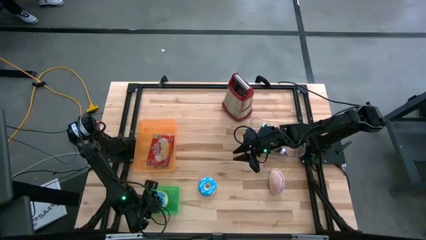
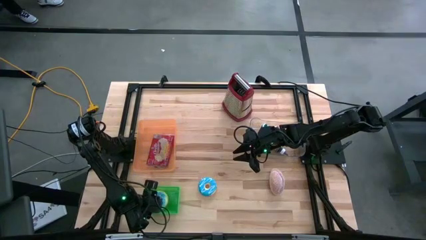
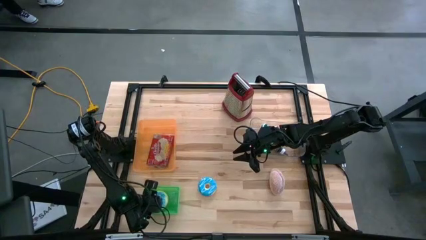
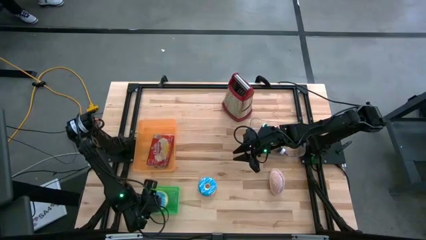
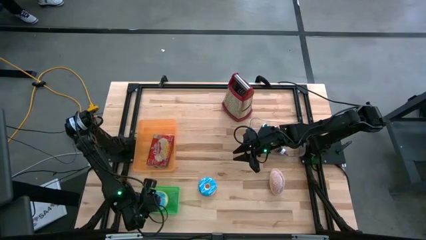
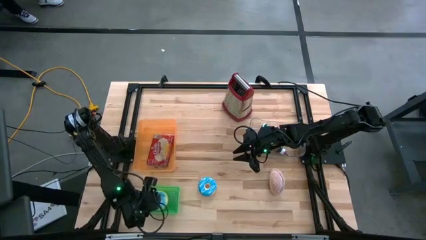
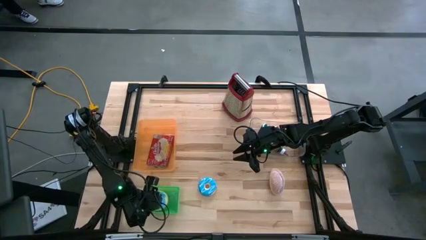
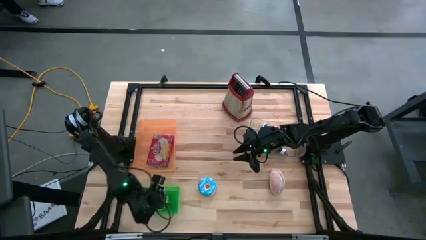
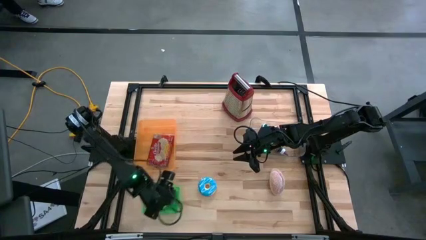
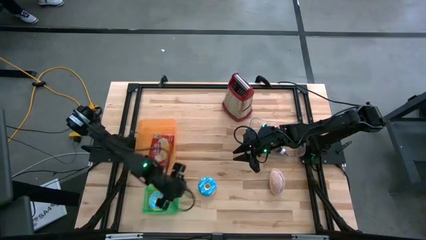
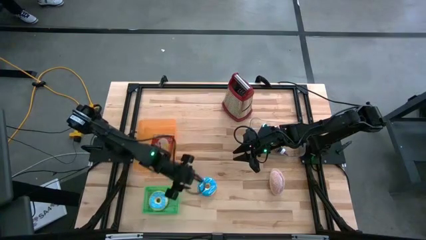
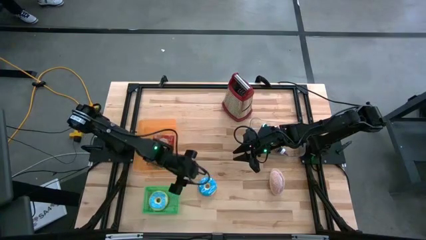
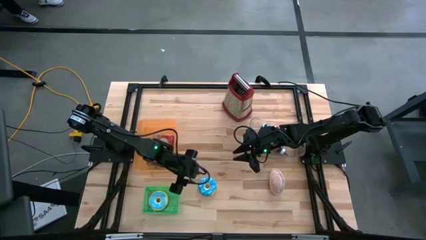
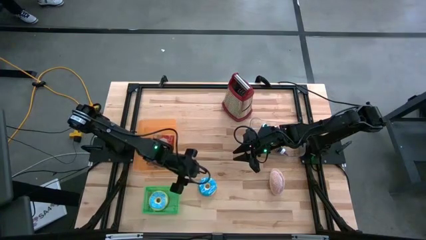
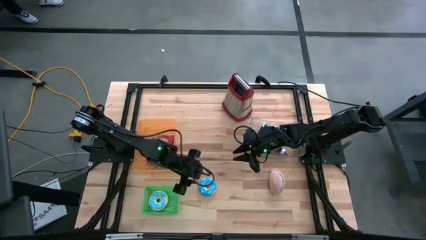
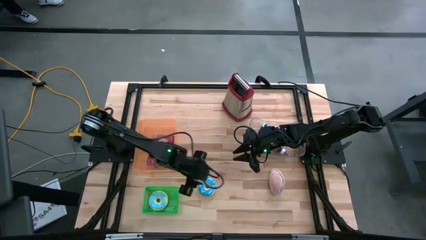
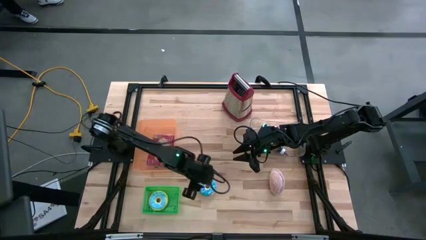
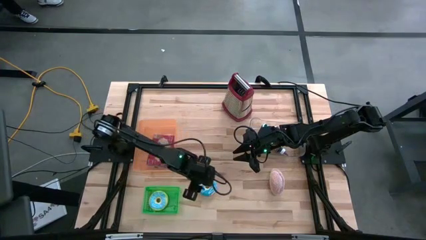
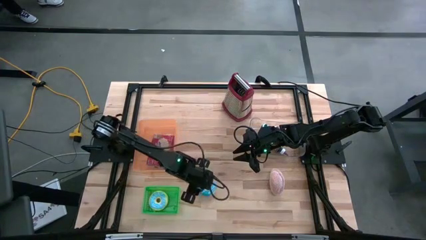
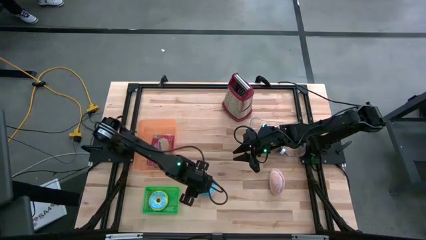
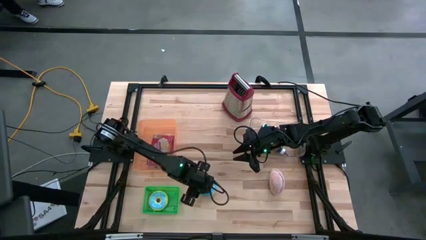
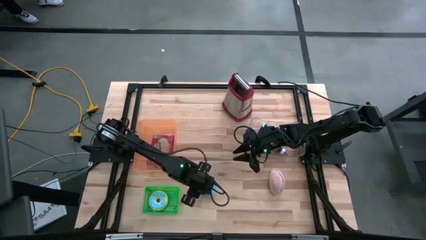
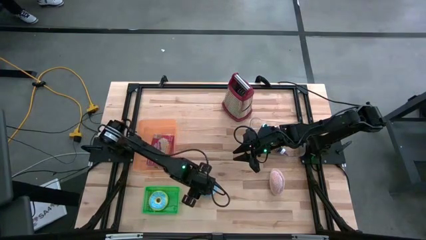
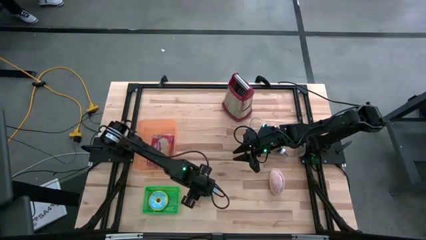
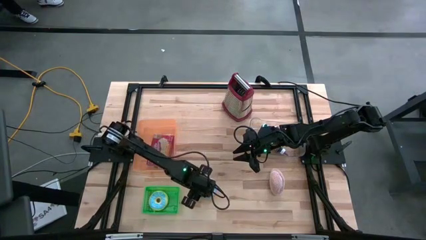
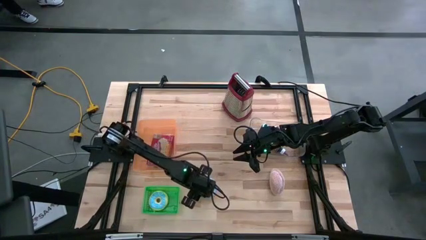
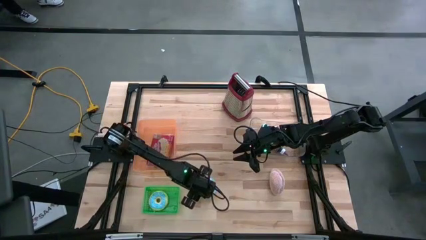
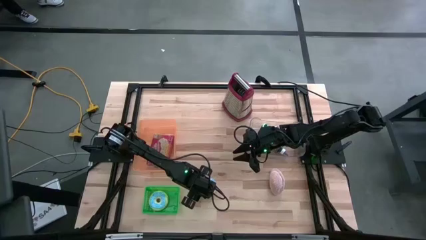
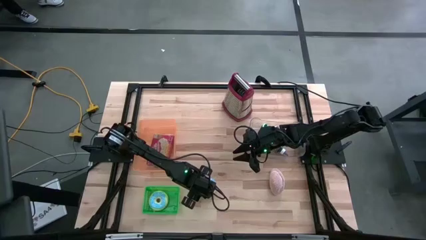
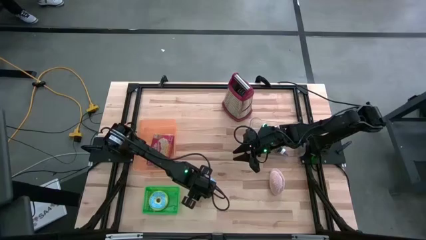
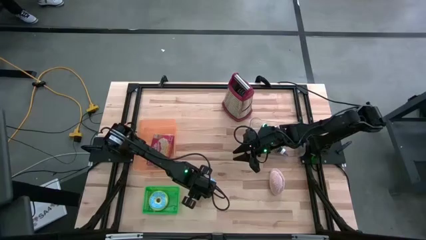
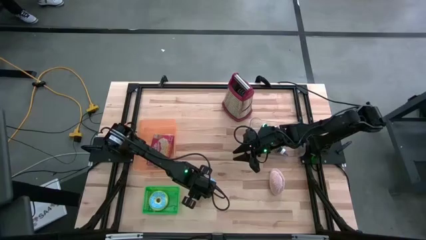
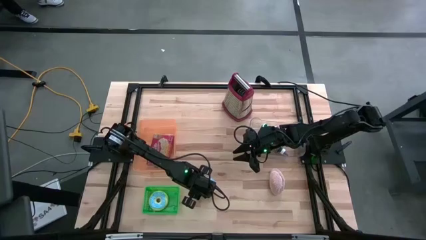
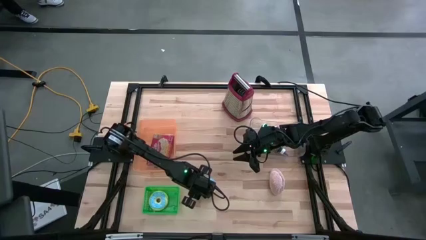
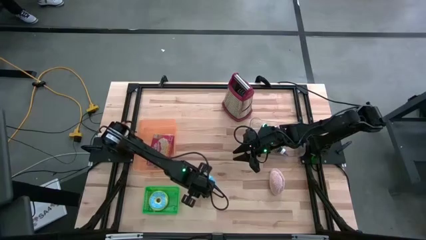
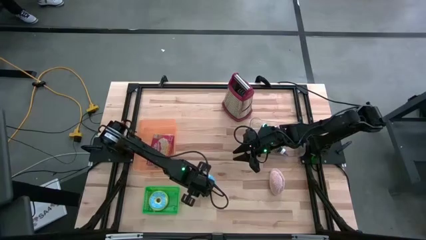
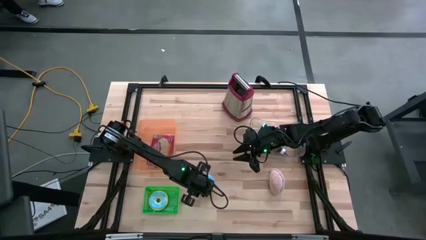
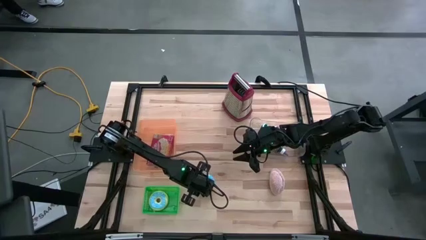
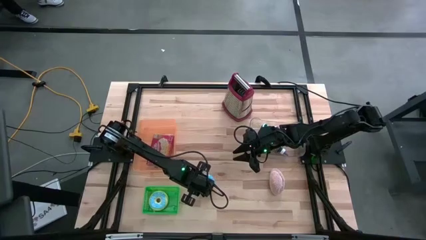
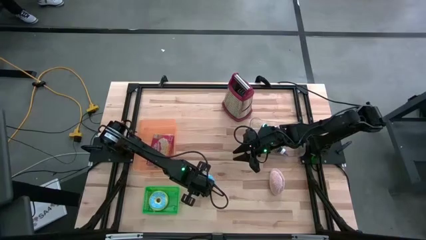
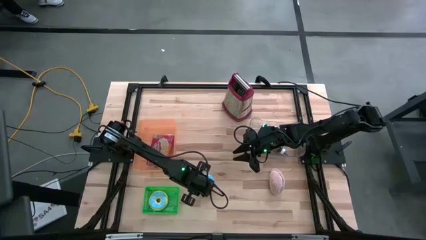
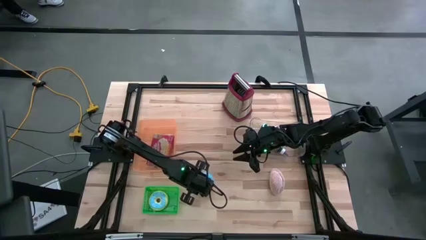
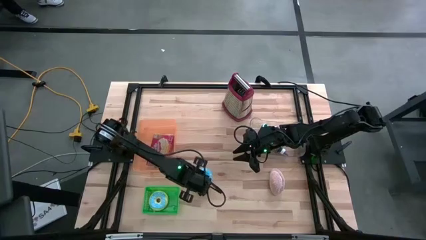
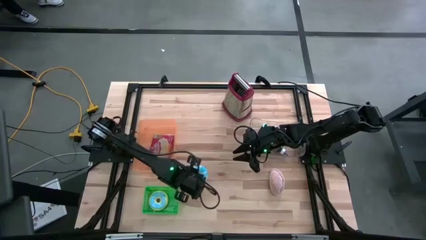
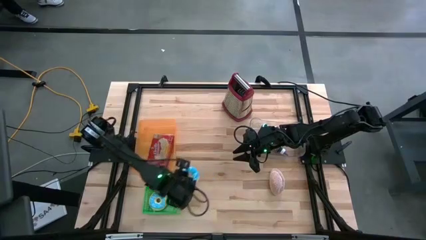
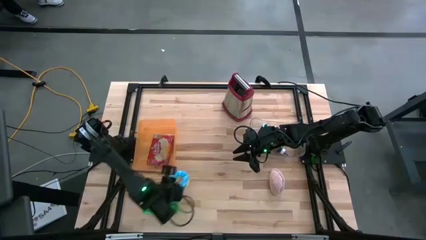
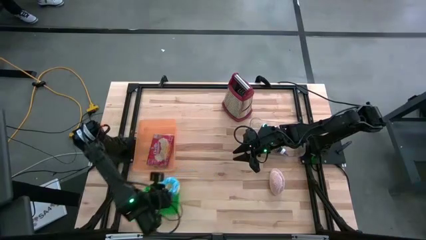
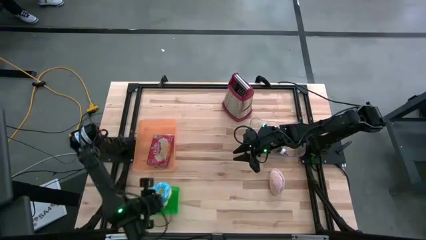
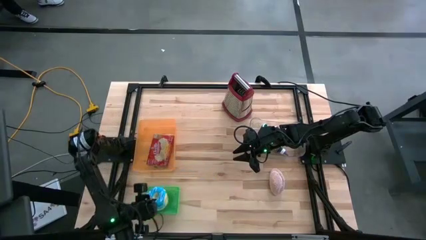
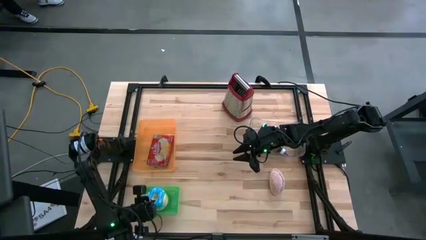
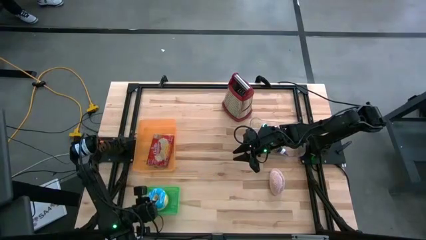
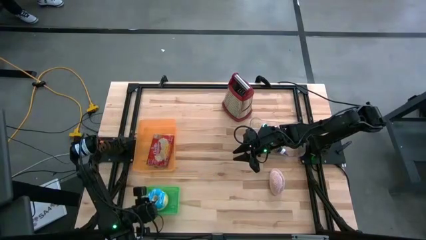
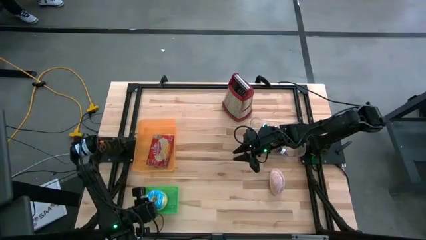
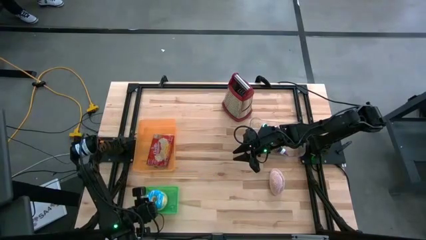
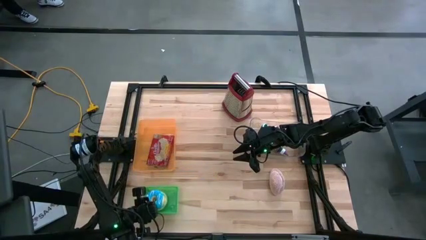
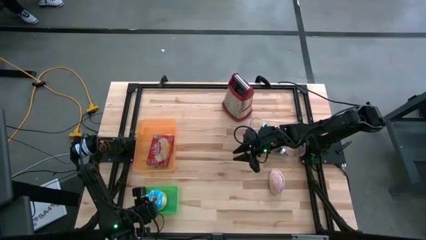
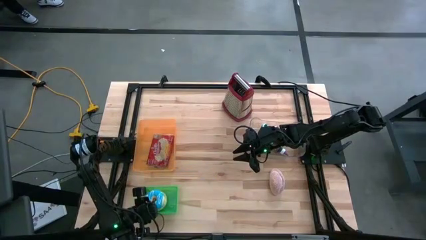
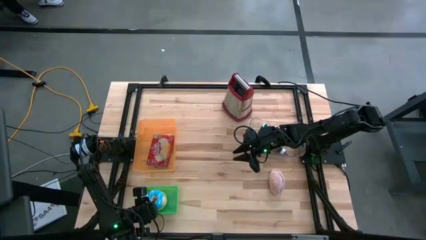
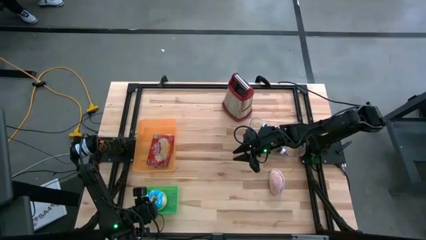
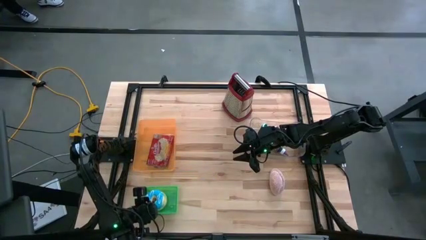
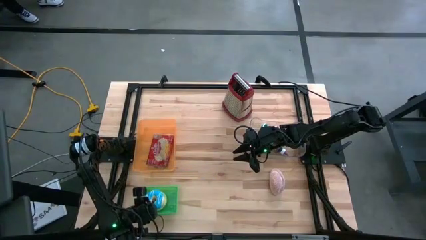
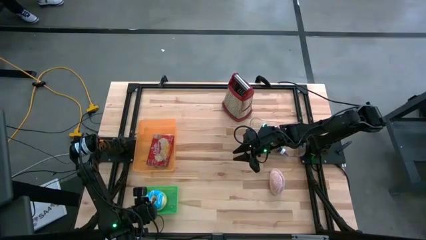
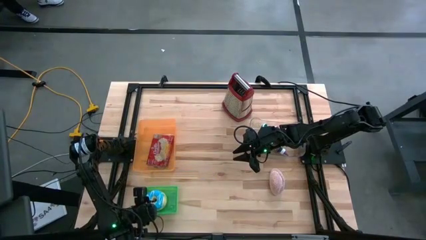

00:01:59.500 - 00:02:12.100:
Put the blue donut into the green bin
